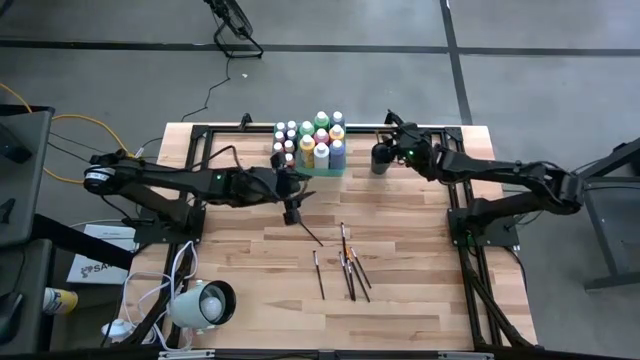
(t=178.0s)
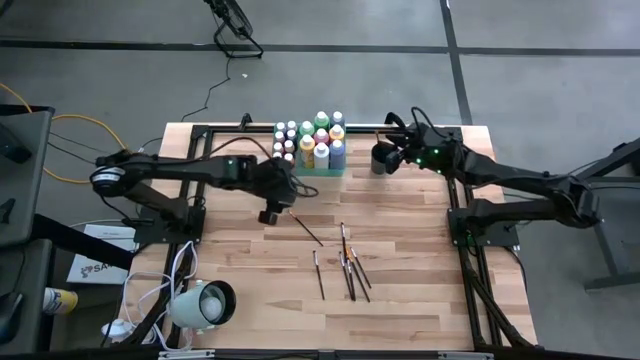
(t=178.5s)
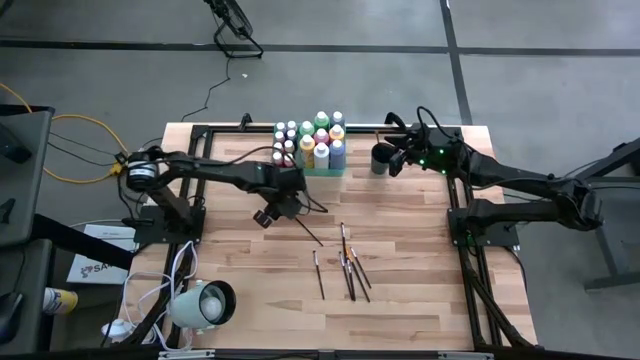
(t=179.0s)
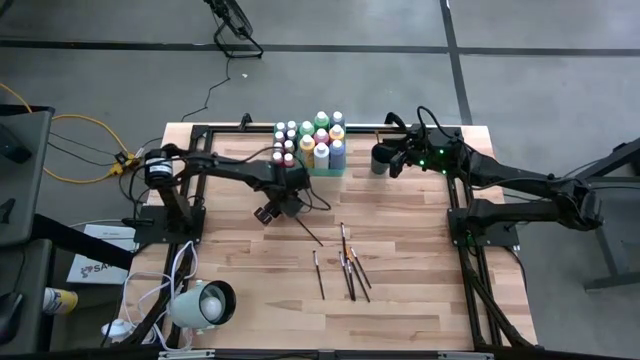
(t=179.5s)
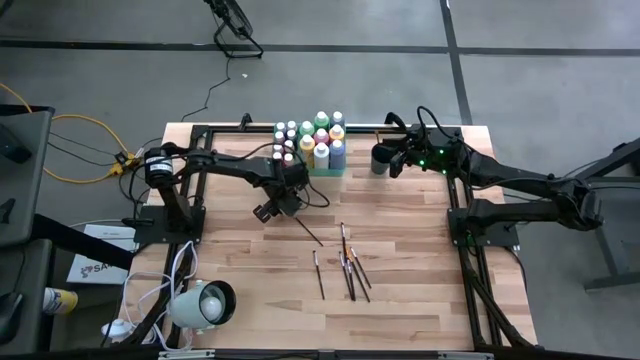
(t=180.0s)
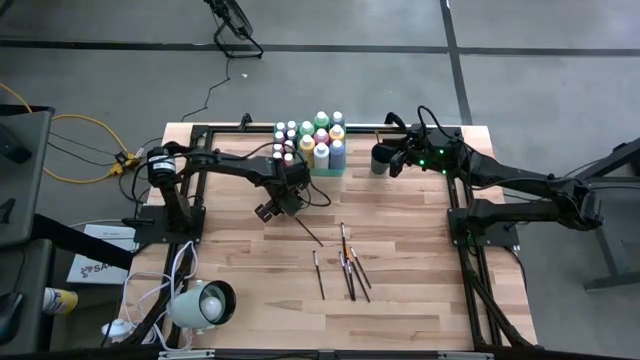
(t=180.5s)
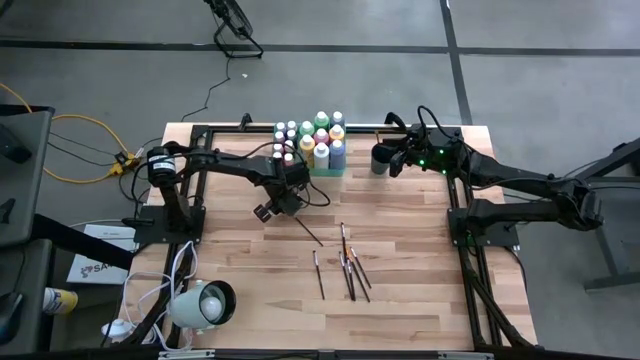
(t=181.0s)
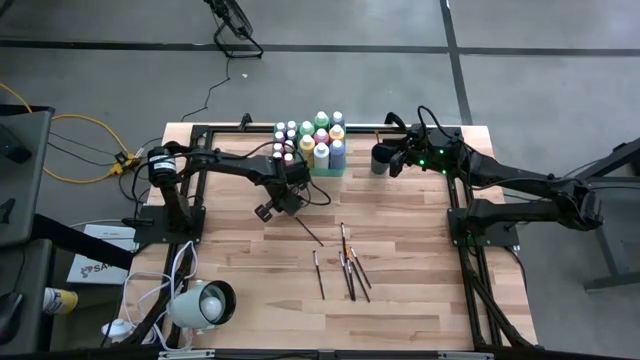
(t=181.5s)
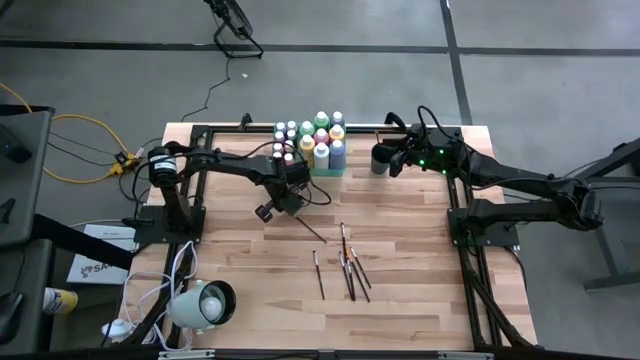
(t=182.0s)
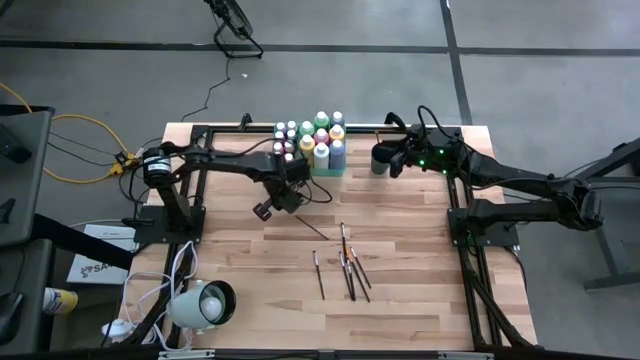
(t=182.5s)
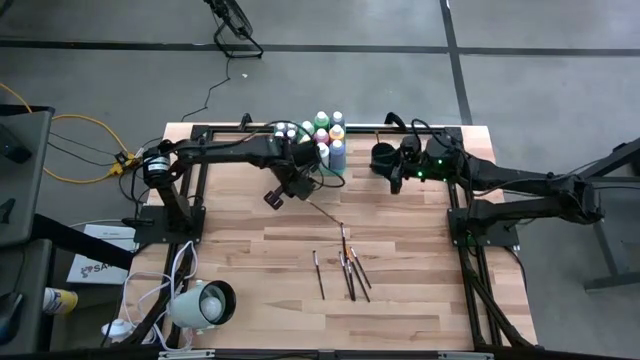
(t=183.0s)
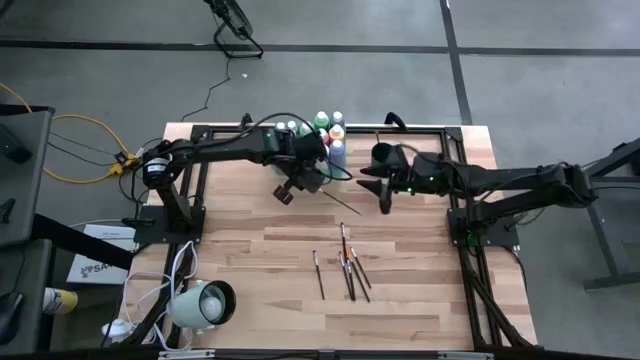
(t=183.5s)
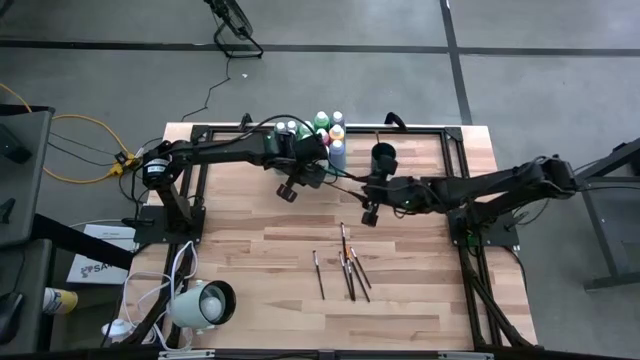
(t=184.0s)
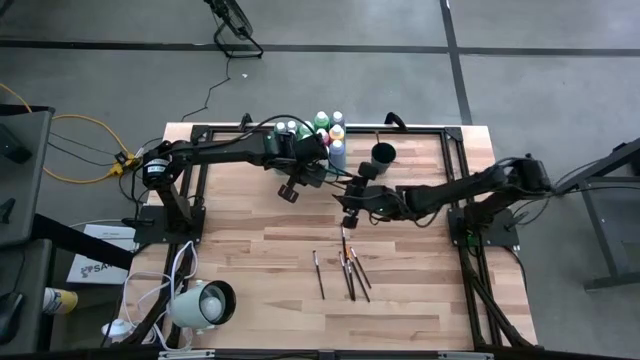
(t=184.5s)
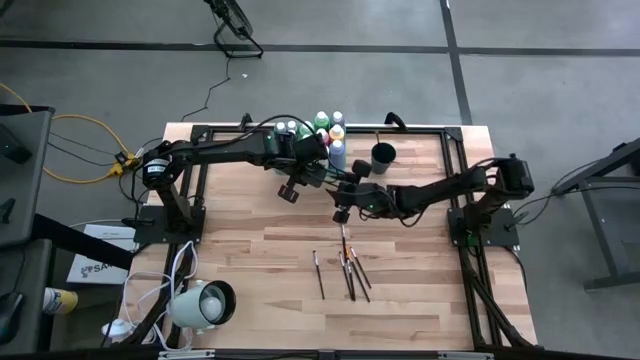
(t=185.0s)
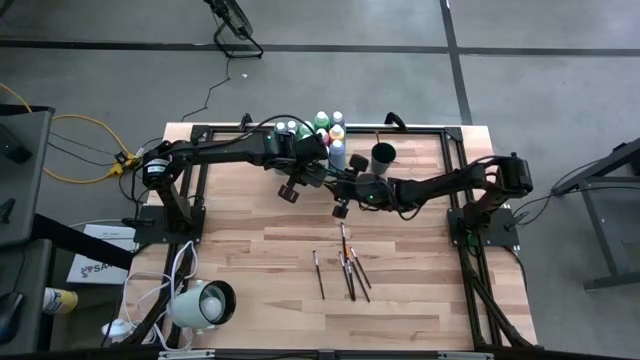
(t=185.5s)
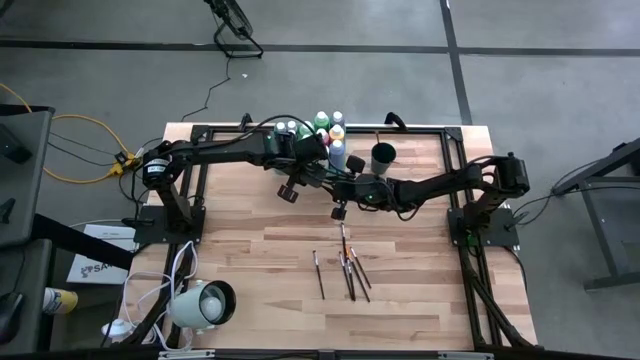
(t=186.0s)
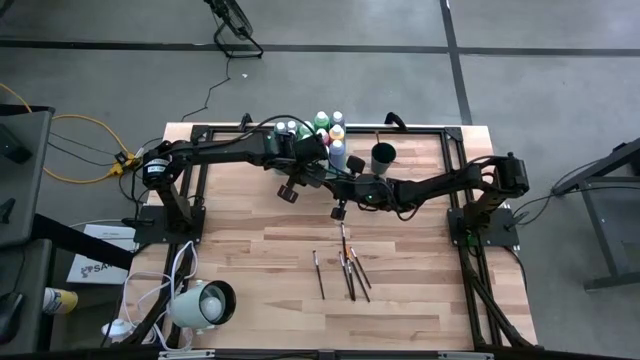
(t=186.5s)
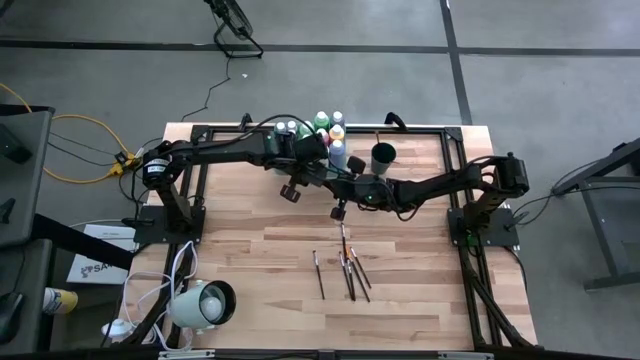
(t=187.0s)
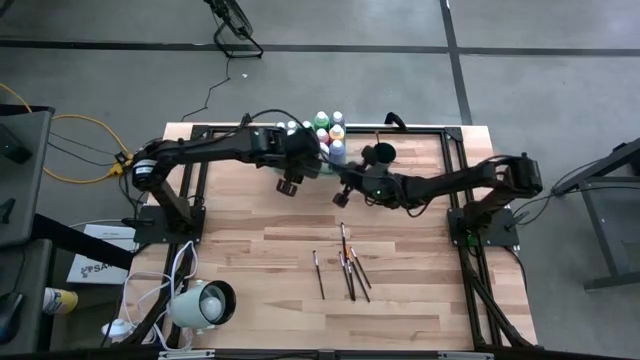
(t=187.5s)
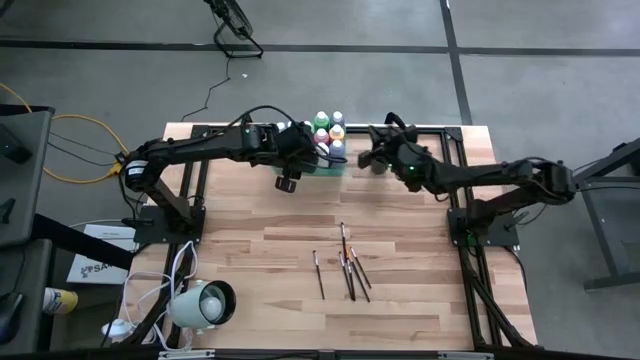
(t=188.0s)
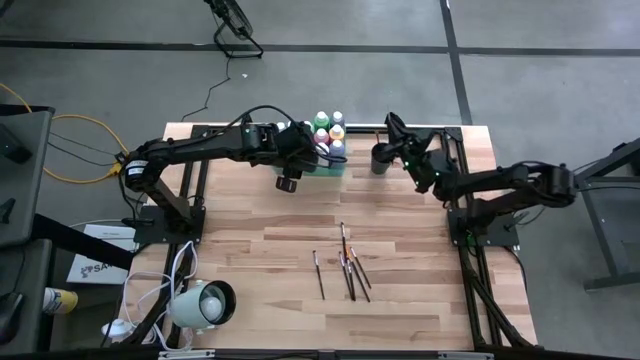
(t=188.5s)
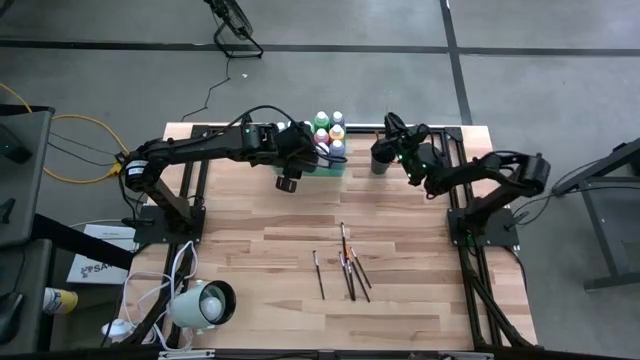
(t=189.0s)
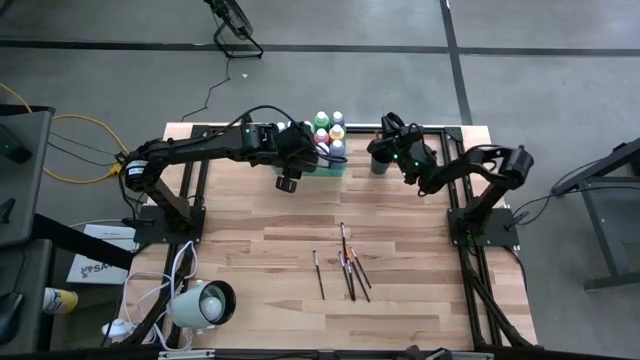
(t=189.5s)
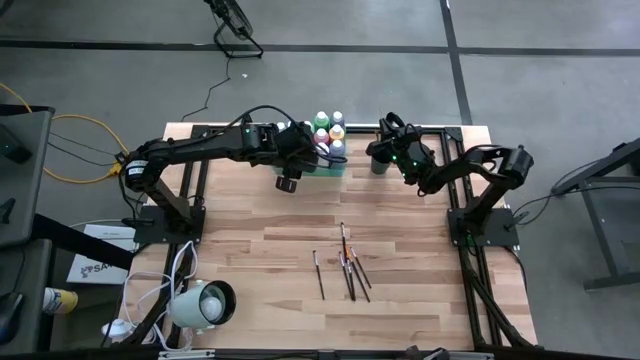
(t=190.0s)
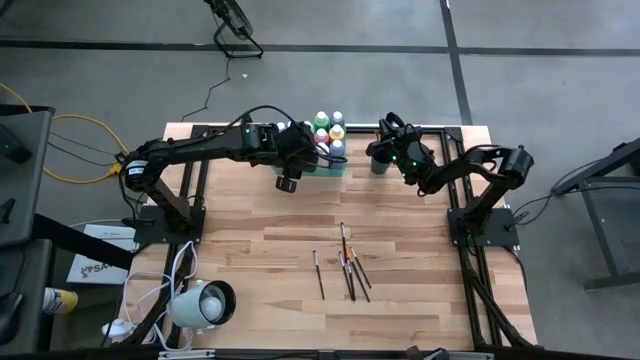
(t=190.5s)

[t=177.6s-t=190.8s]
Task: Pick & Place Paint Supplies
Put the orange paint brush into the green cup

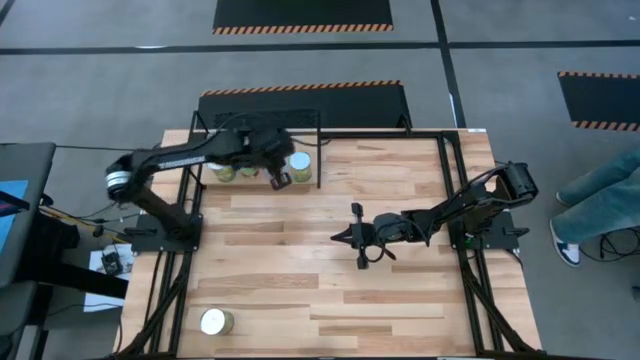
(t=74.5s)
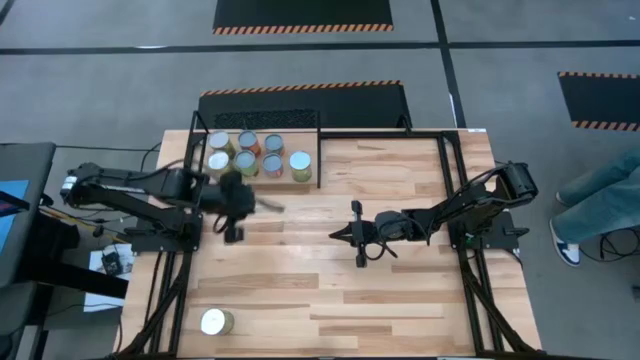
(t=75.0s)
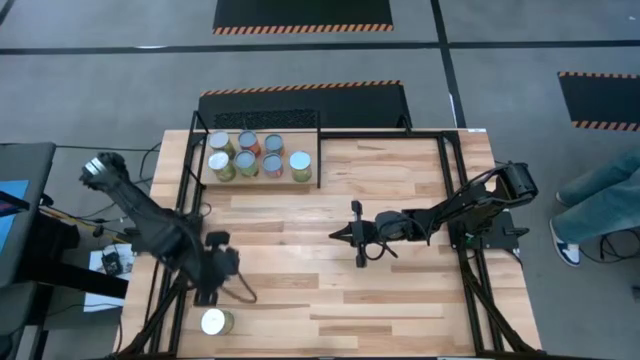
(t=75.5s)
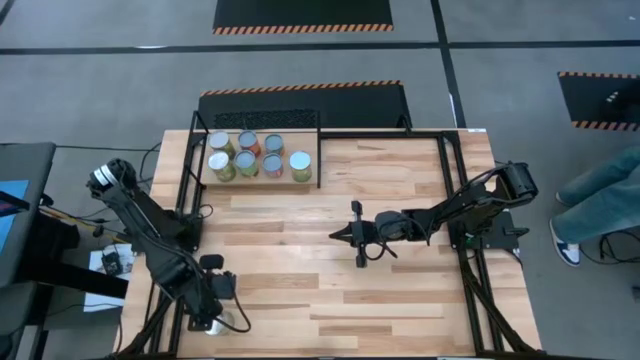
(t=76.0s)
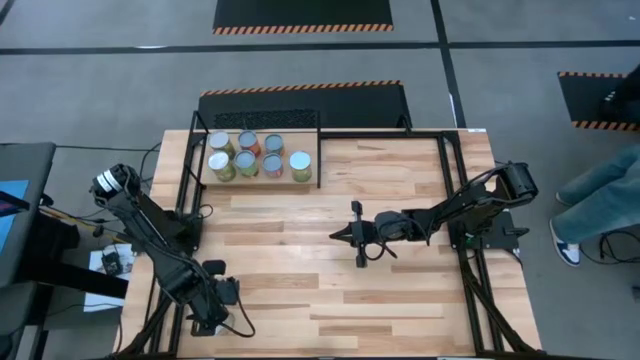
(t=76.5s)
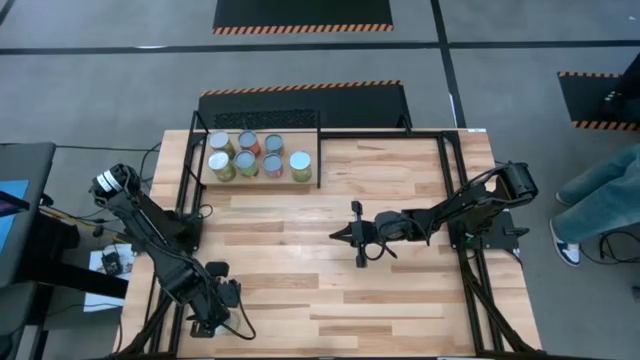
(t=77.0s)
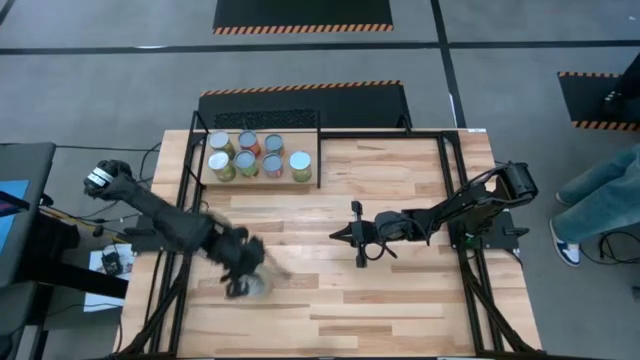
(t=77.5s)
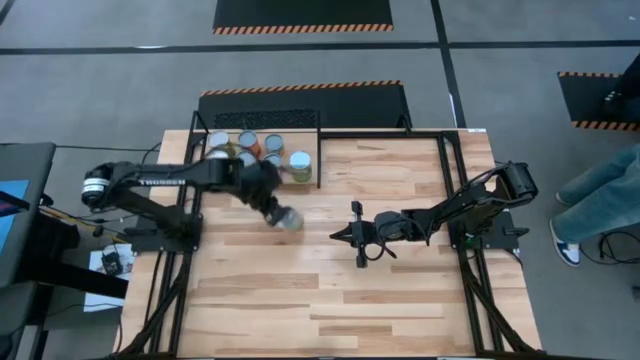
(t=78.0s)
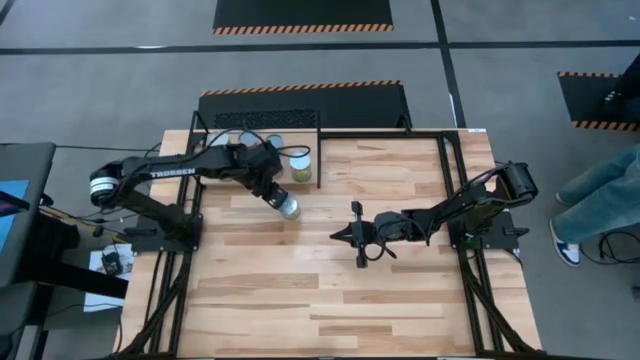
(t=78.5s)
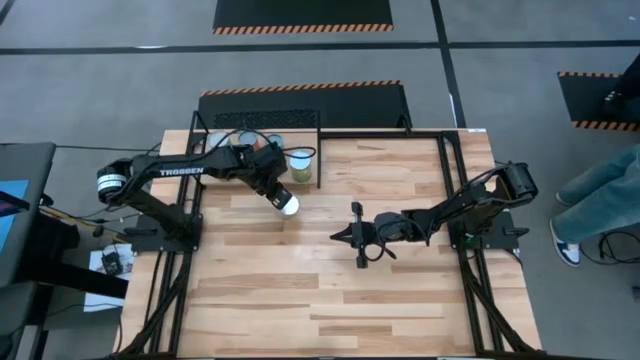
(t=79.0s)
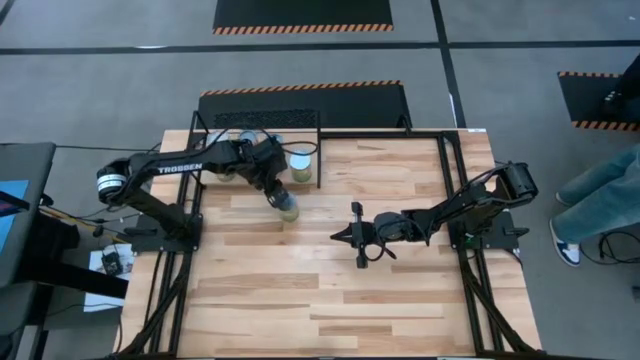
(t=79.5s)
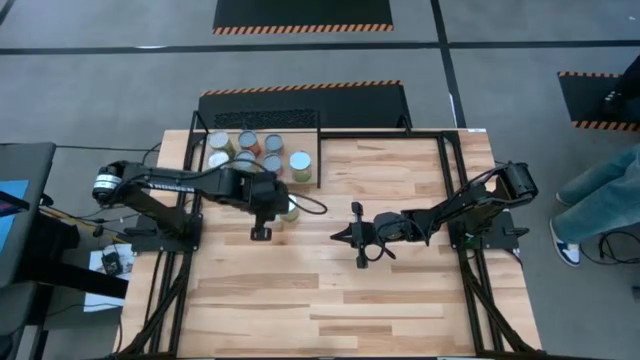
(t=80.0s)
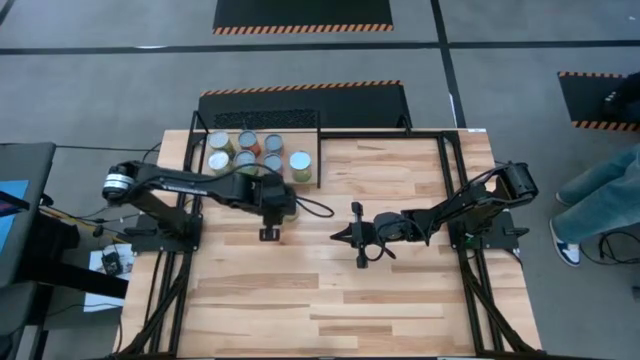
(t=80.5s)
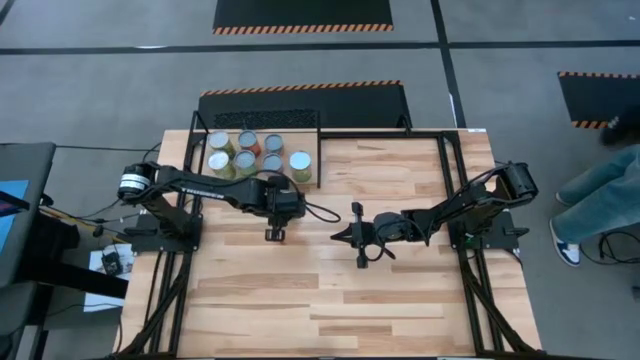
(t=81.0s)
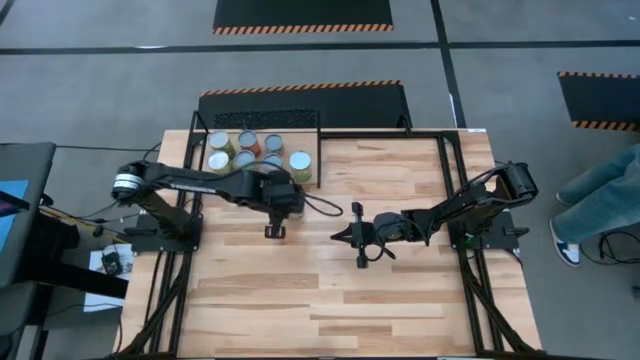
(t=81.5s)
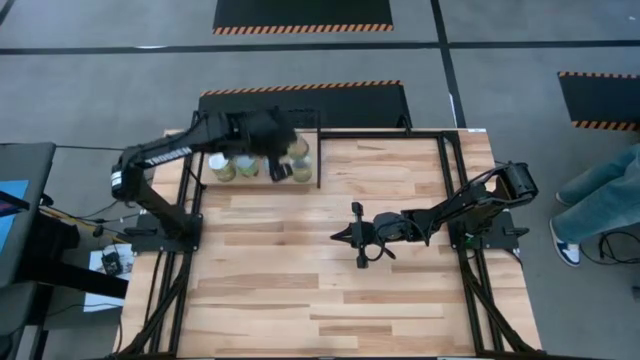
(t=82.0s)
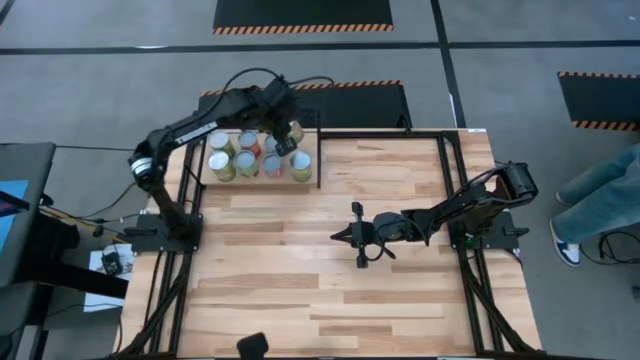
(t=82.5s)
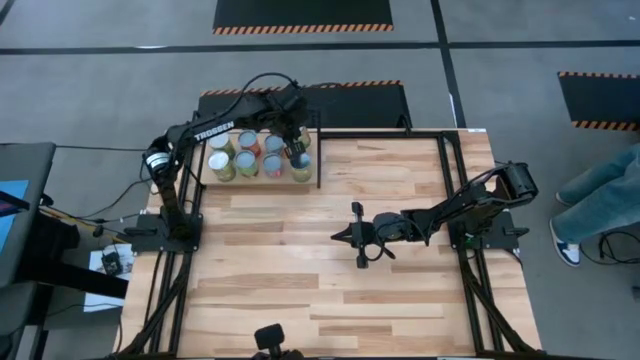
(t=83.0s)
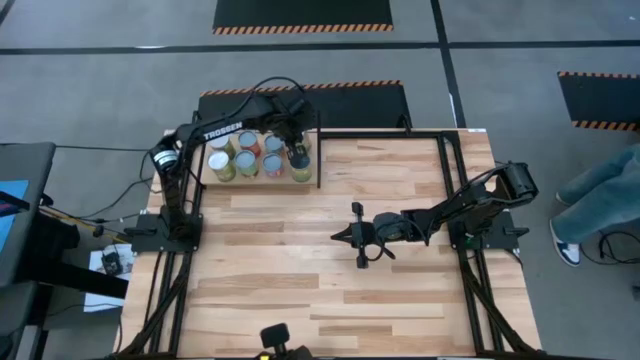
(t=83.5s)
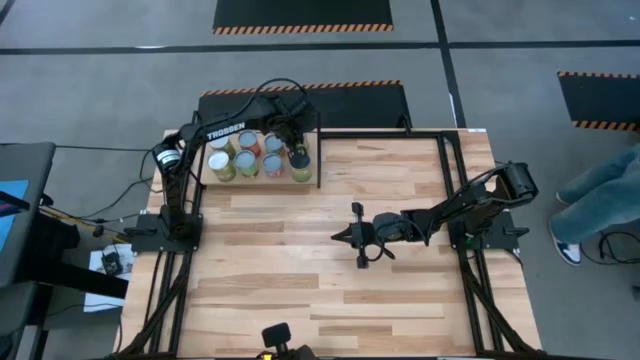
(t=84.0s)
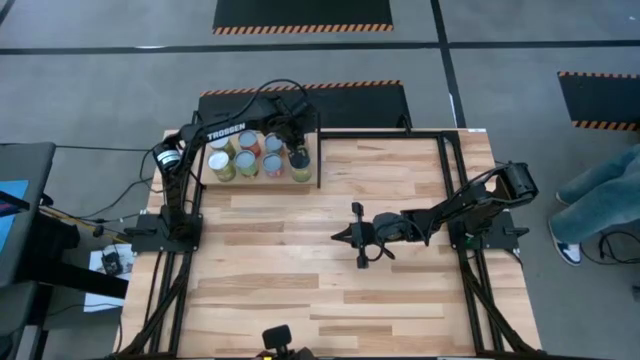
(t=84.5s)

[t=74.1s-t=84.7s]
Task: Pick and place cans onto a shelf
Put the large canned oranges on the shelf
